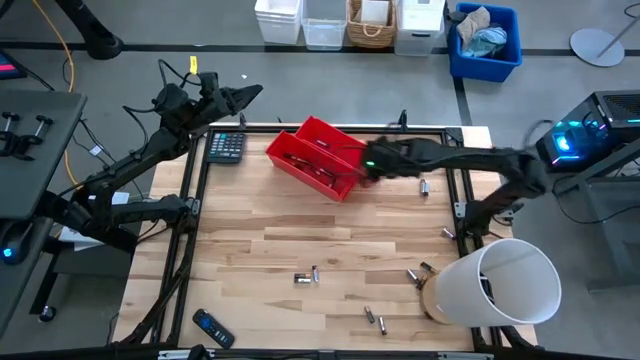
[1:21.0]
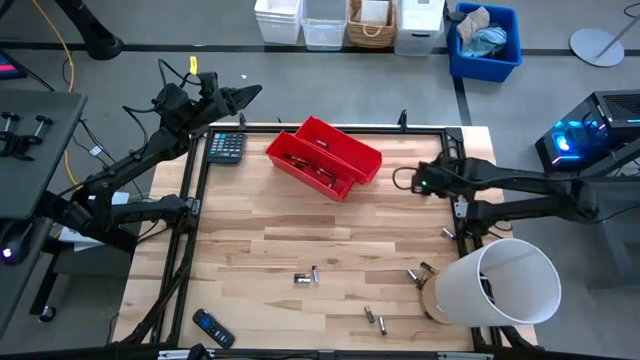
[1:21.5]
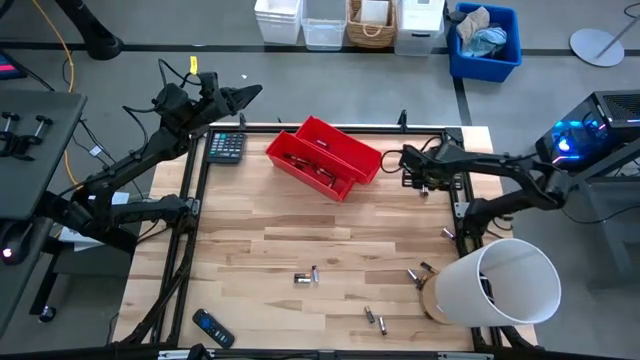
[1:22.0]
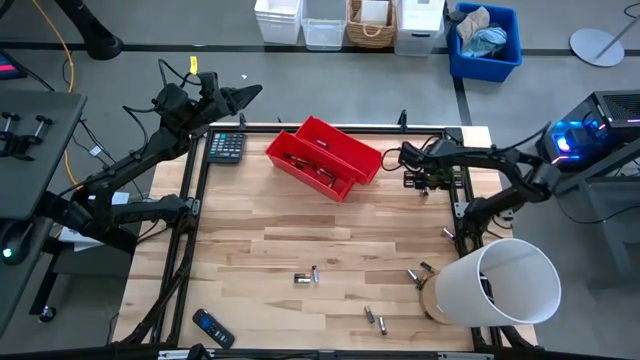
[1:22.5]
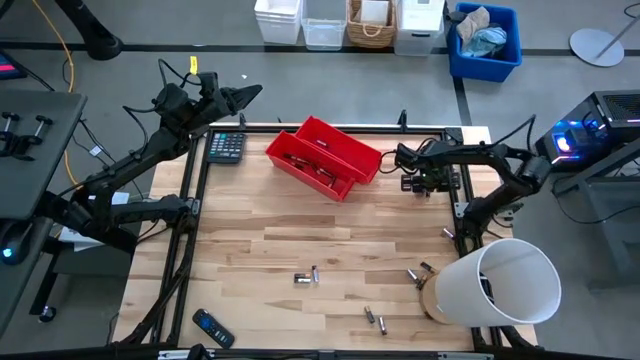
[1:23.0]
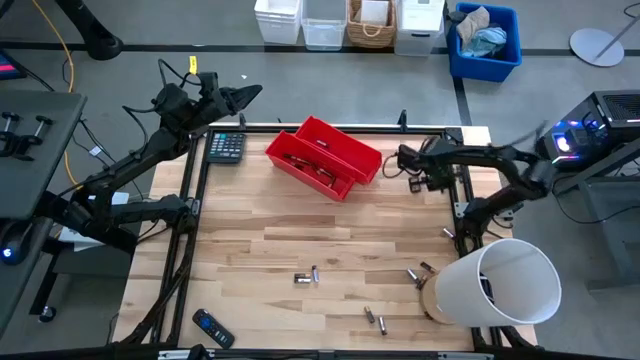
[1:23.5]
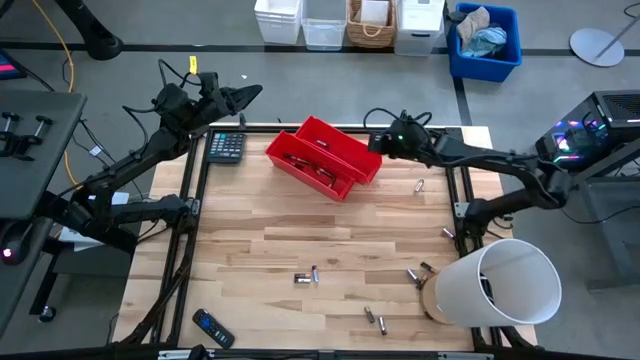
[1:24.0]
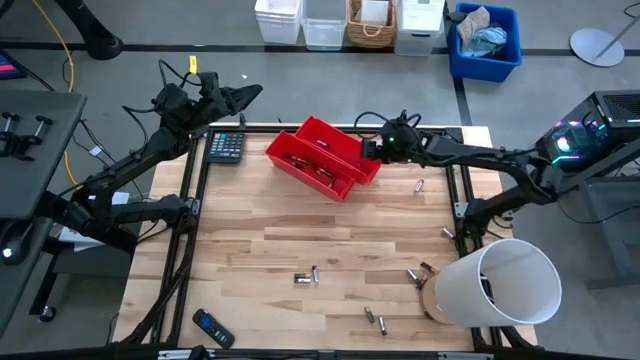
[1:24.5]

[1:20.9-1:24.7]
Task: Sort batteries
Put the silver battery into the top red bin

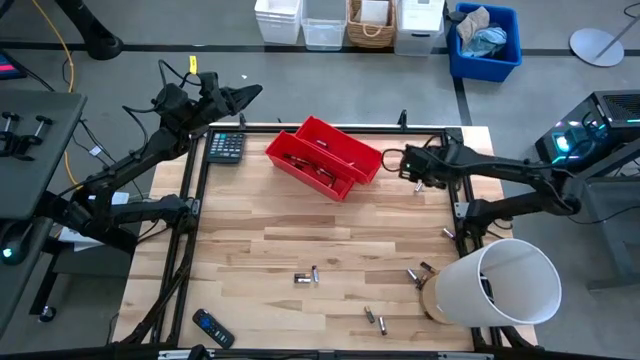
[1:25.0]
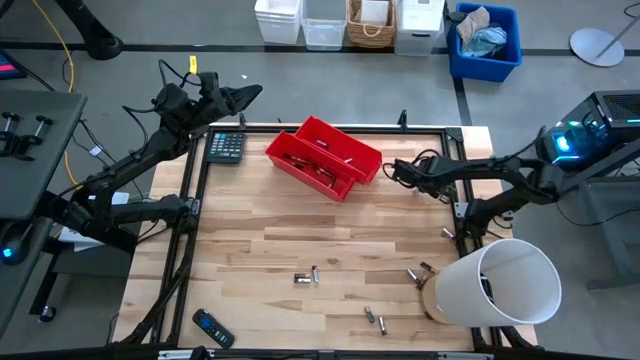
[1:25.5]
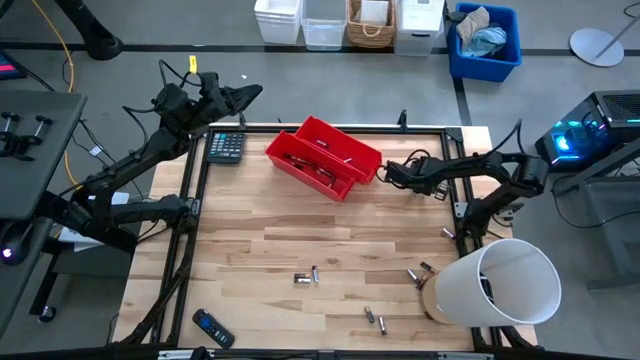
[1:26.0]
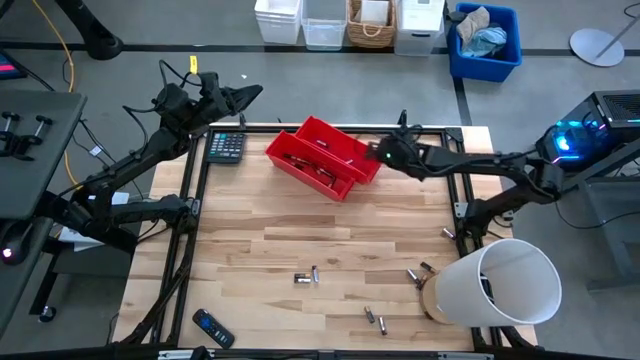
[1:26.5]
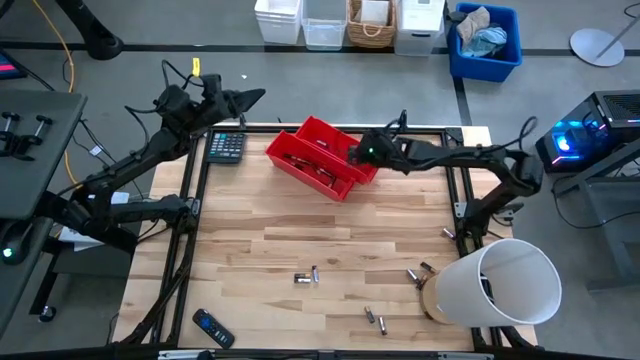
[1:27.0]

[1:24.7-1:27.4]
Put the silver battery into the top red bin

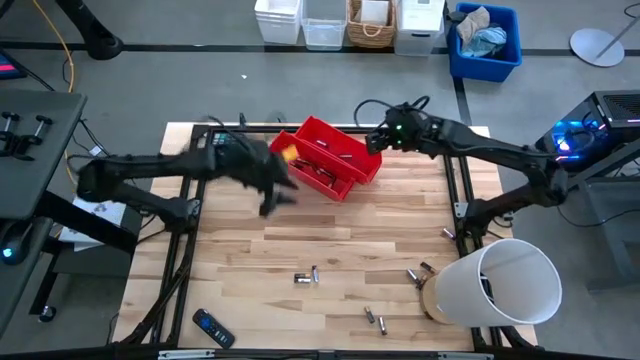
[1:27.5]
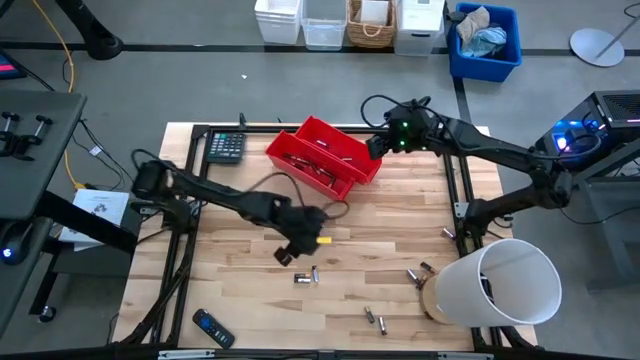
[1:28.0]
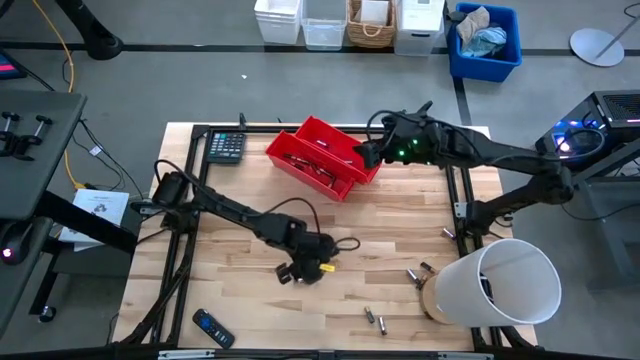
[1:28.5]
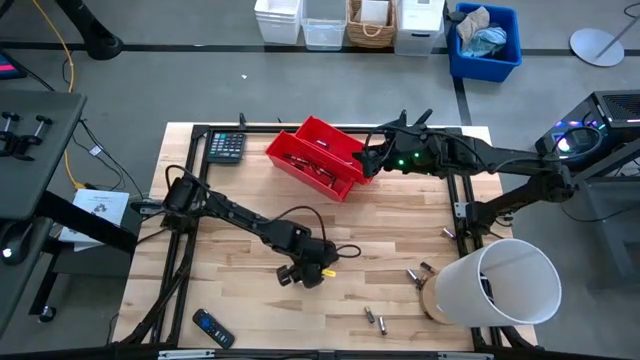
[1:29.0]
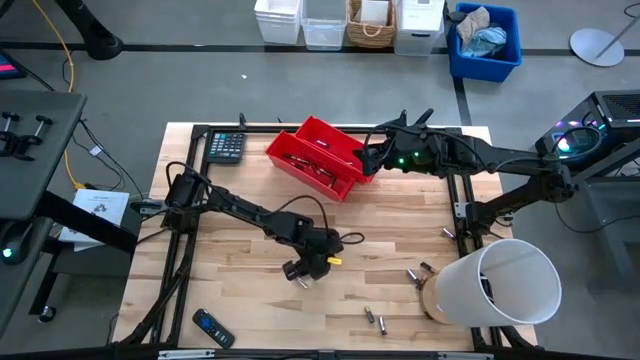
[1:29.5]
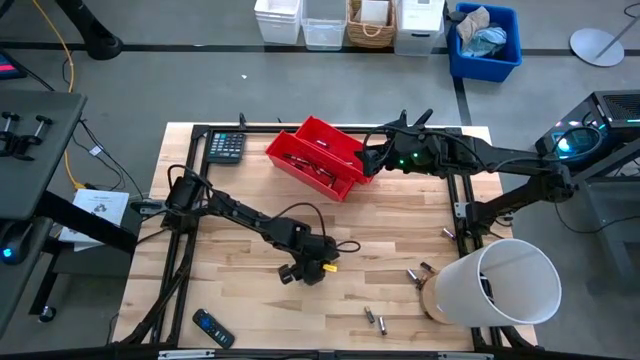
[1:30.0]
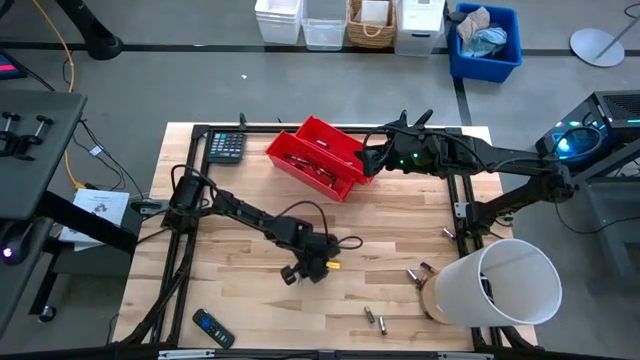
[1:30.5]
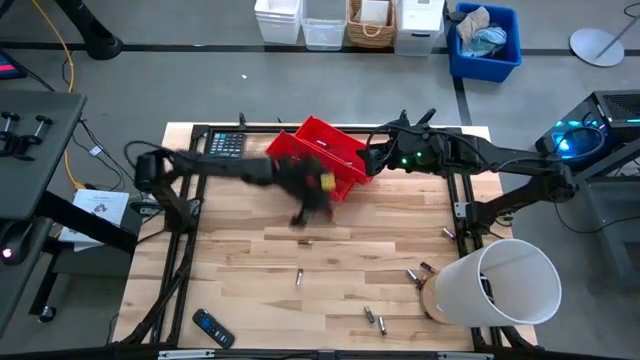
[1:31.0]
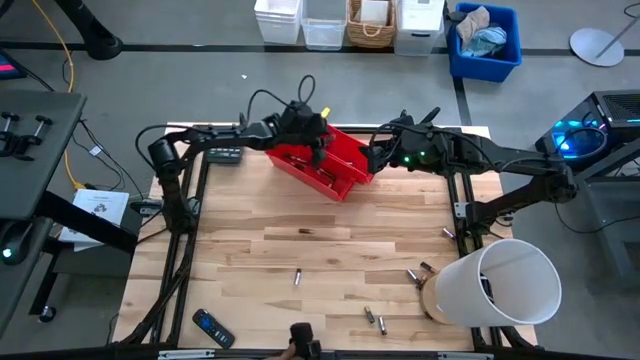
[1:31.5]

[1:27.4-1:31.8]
Put the silver battery into the top red bin

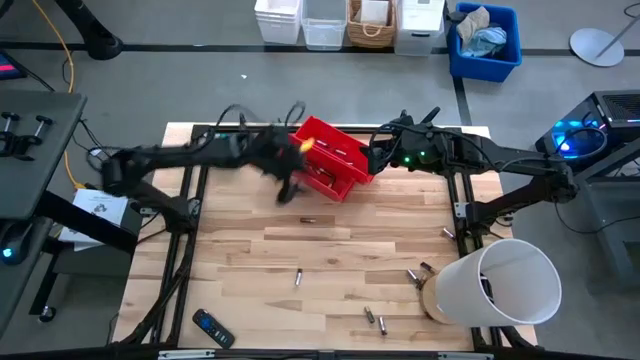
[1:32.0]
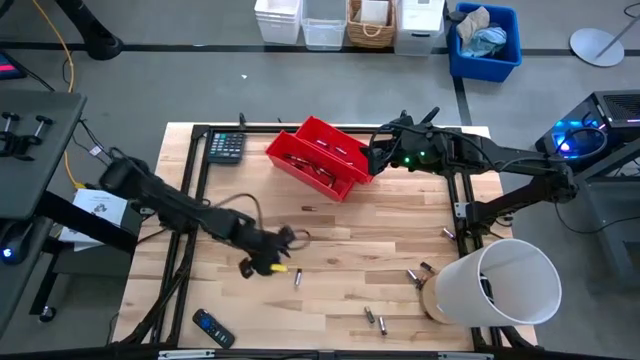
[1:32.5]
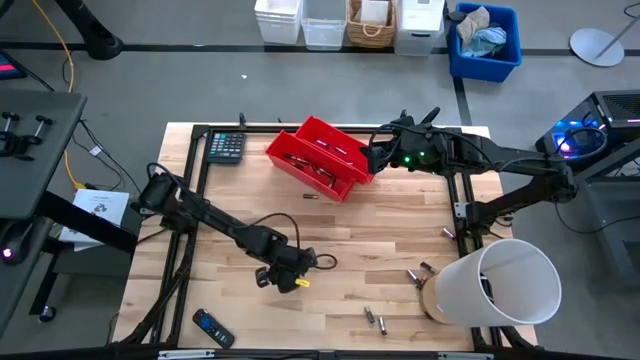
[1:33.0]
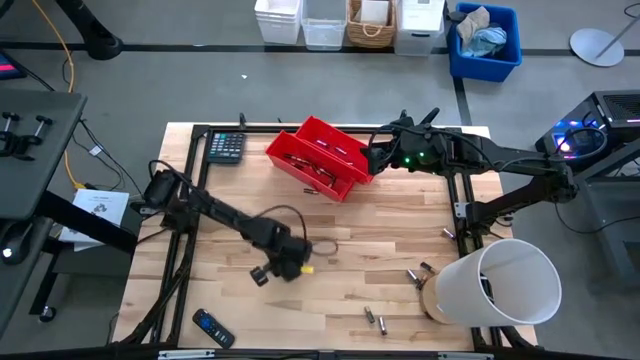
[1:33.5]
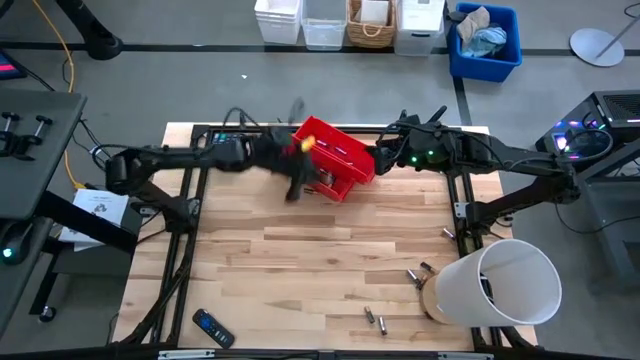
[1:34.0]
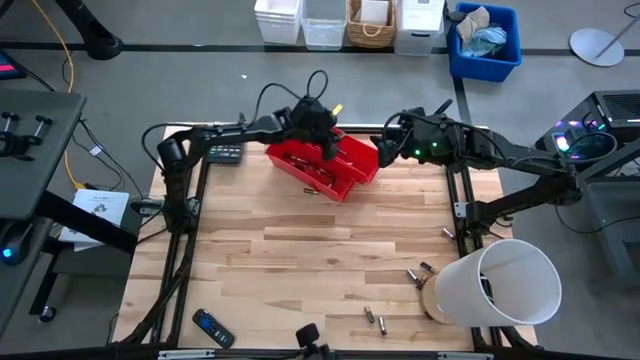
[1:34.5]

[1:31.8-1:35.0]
Put the silver battery into the top red bin

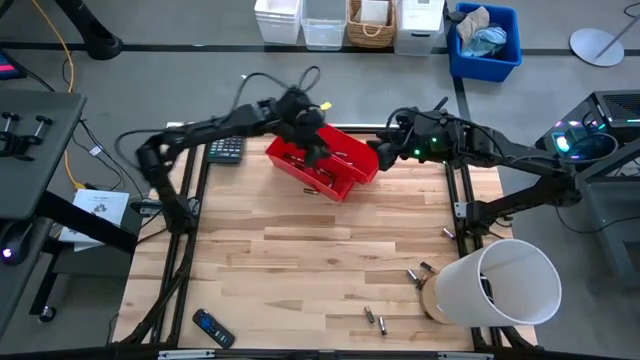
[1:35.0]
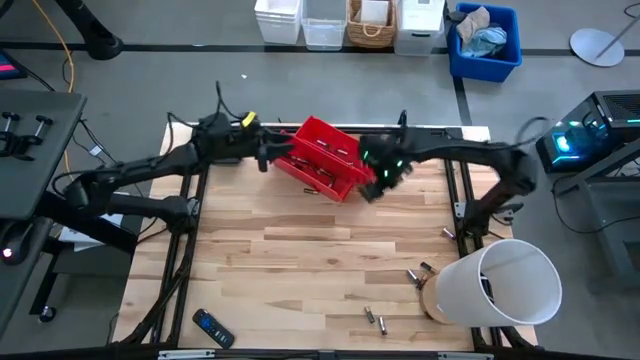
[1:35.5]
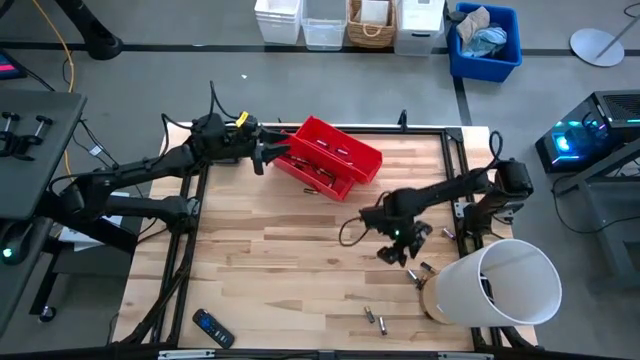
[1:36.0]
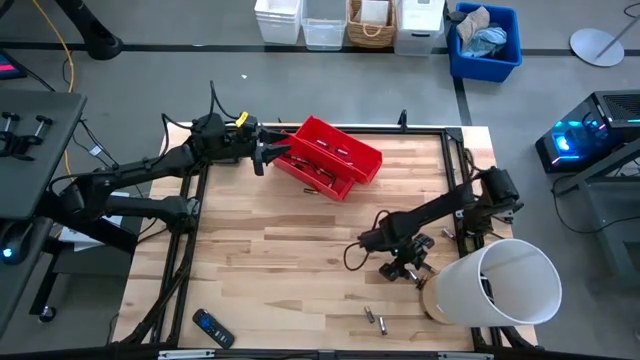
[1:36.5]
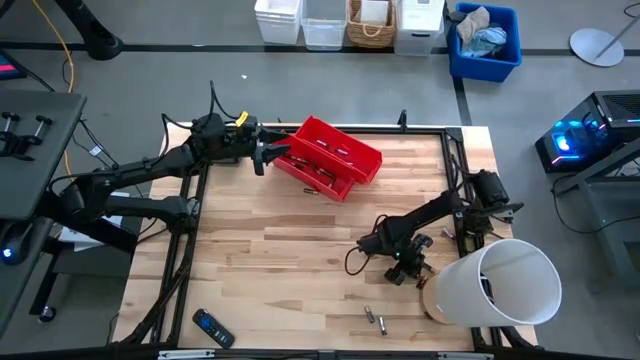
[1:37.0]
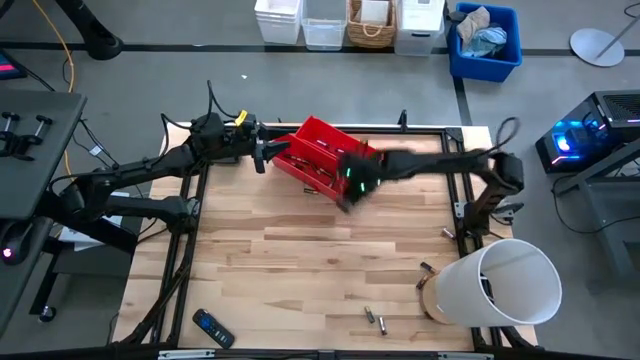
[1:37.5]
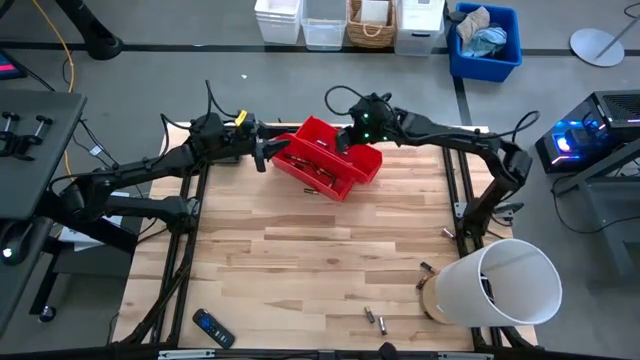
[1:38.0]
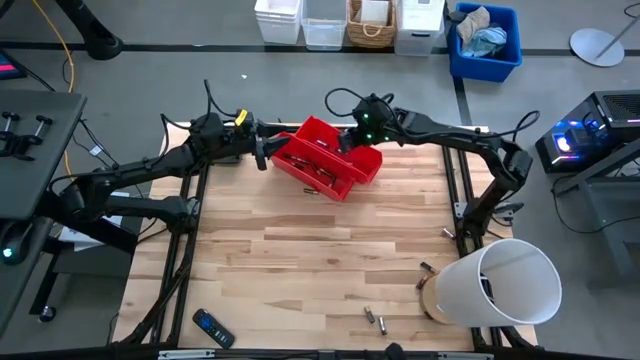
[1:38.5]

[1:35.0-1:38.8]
Put the silver battery into the top red bin

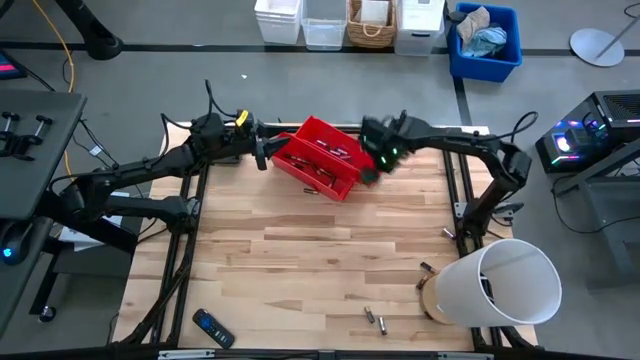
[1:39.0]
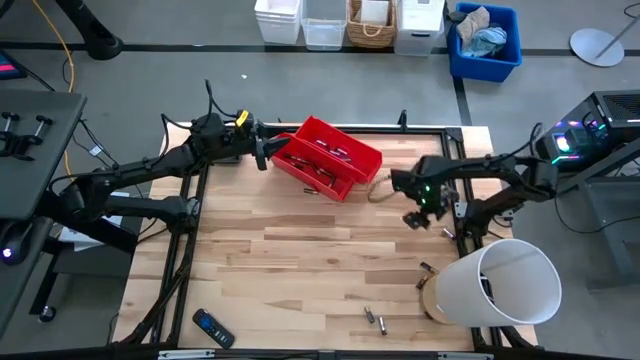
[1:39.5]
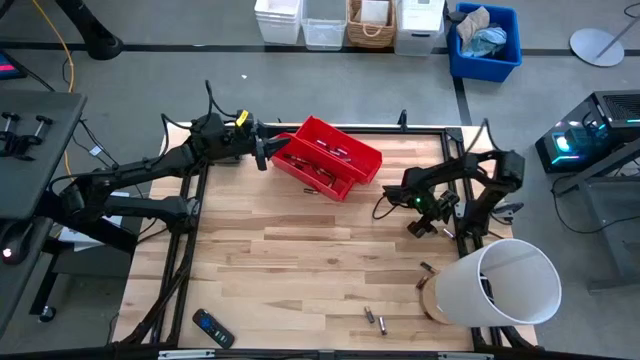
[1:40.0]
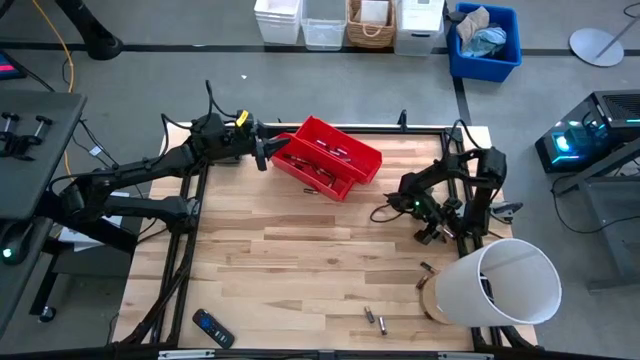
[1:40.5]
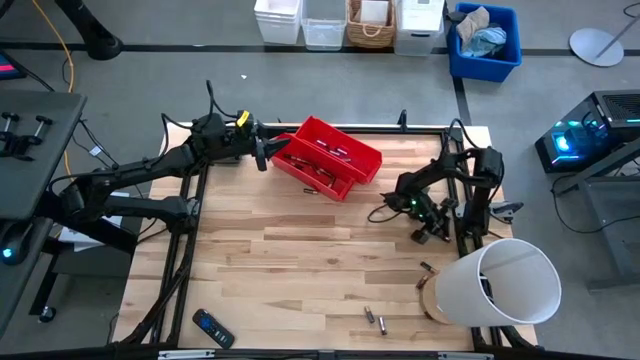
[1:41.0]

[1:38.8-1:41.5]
Put the silver battery into the top red bin

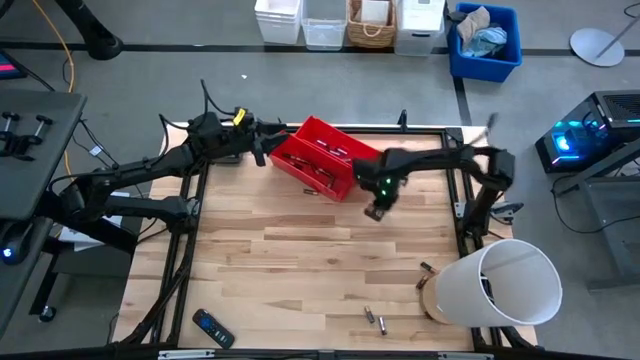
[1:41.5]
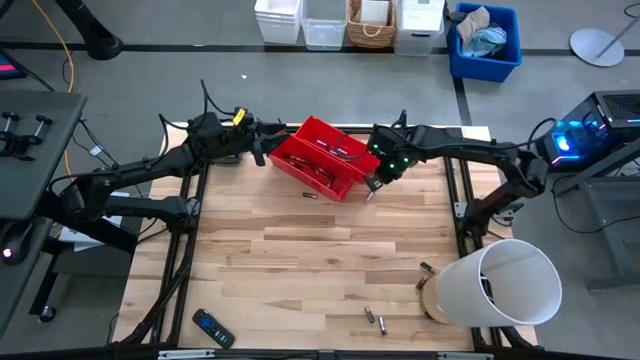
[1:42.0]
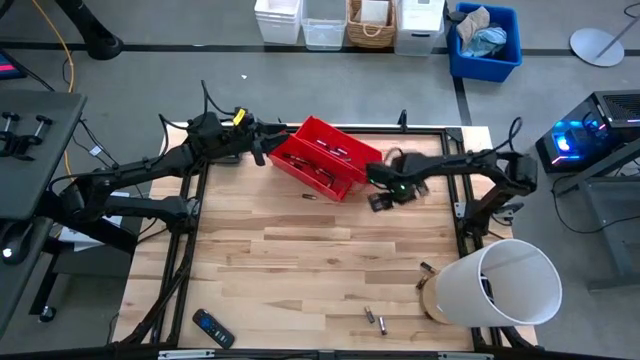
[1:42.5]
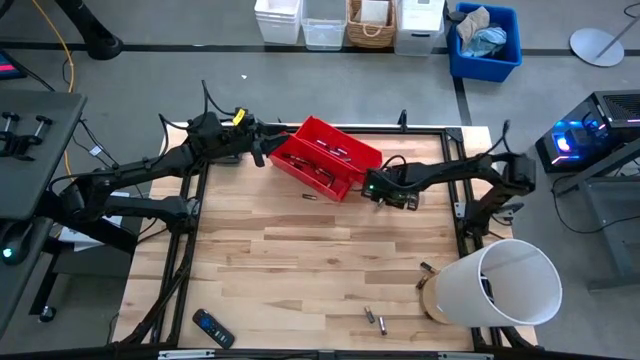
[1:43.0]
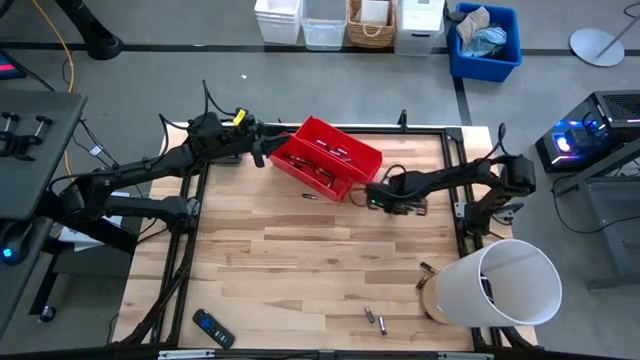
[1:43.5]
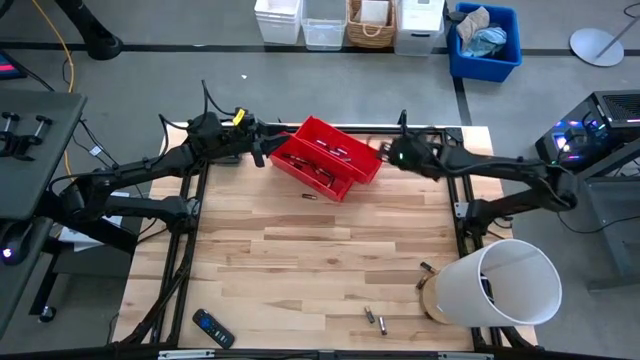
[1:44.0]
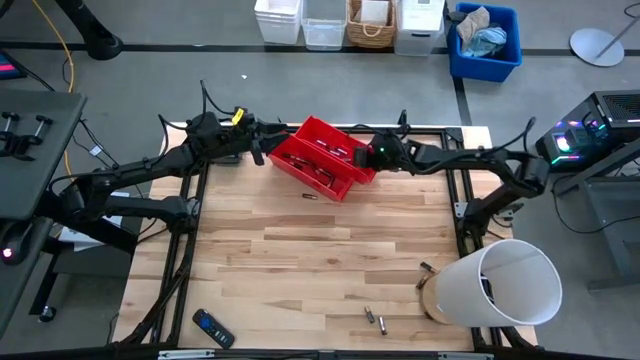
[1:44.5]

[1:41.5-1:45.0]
Put the silver battery into the top red bin
